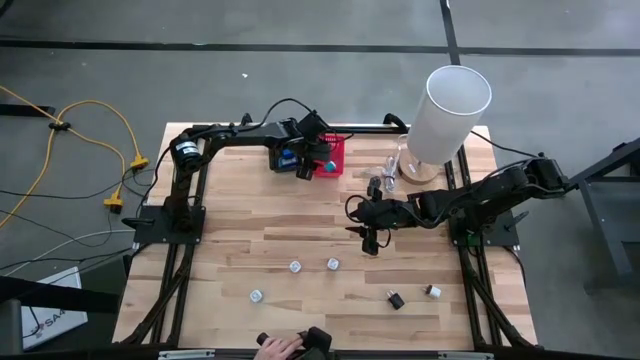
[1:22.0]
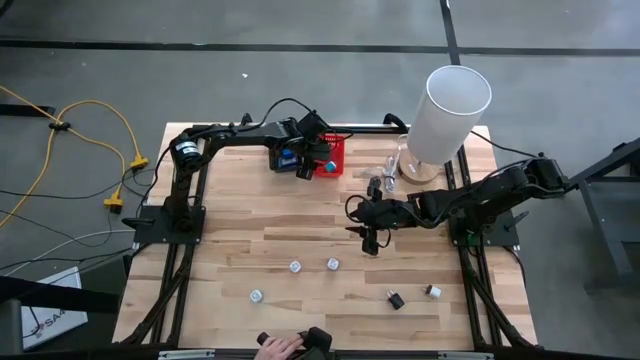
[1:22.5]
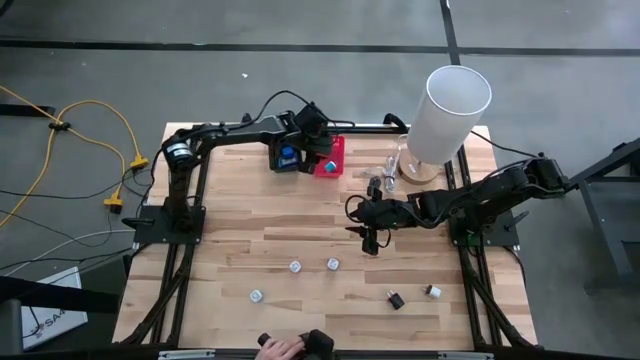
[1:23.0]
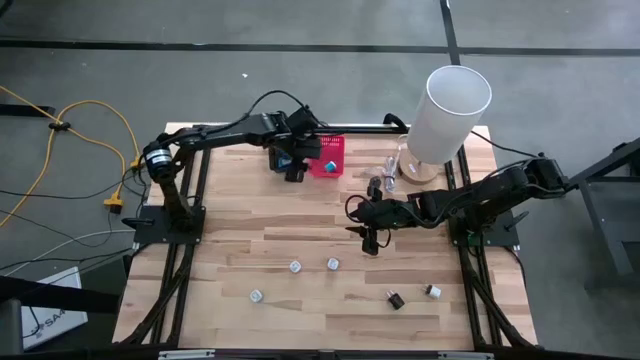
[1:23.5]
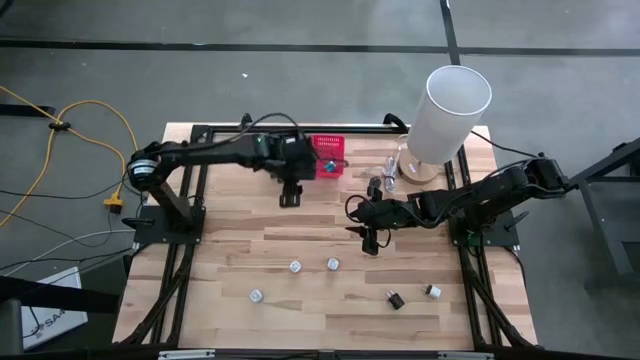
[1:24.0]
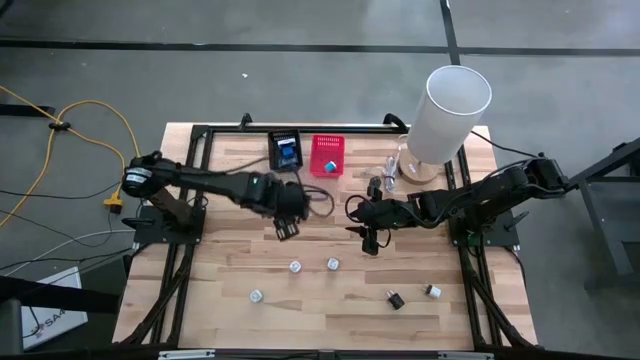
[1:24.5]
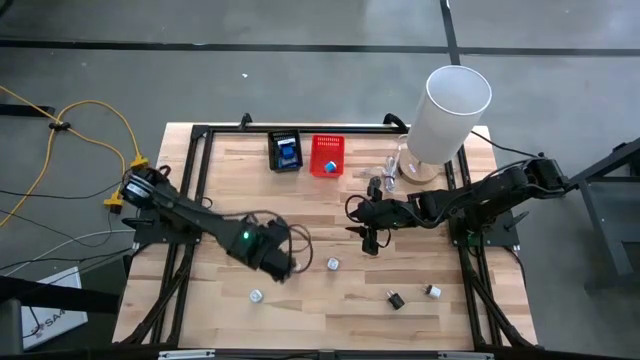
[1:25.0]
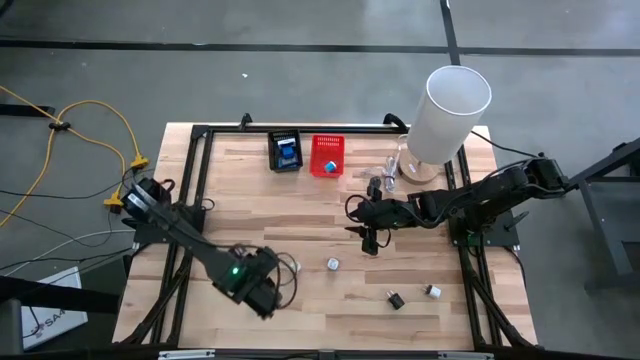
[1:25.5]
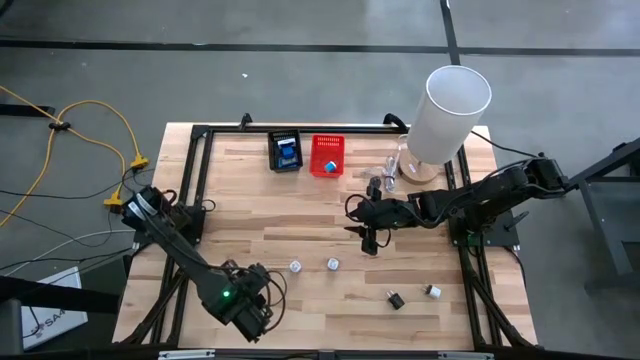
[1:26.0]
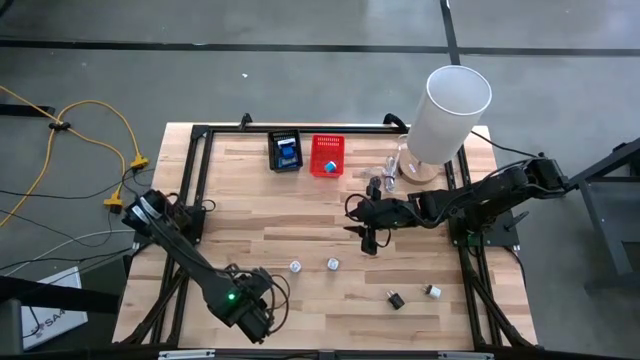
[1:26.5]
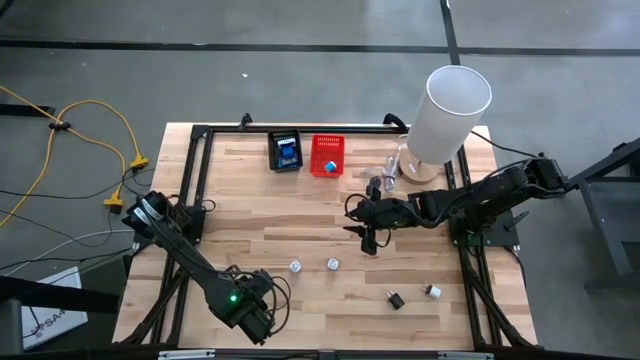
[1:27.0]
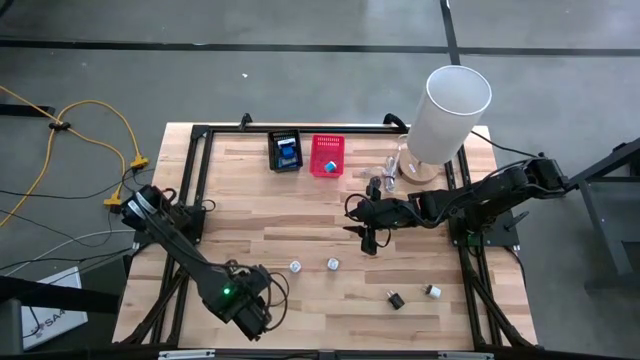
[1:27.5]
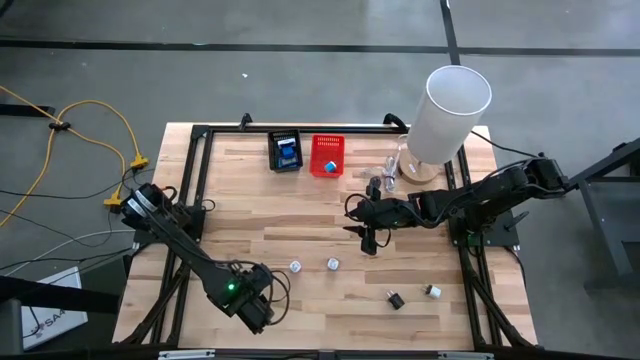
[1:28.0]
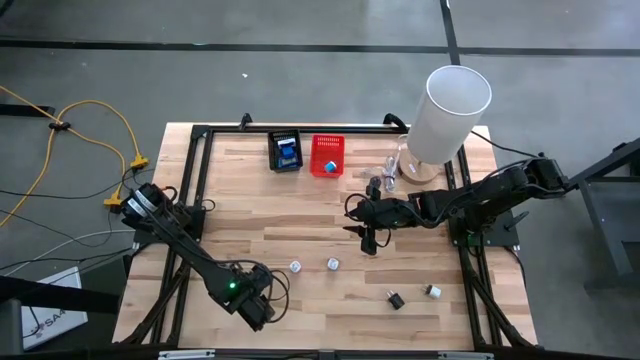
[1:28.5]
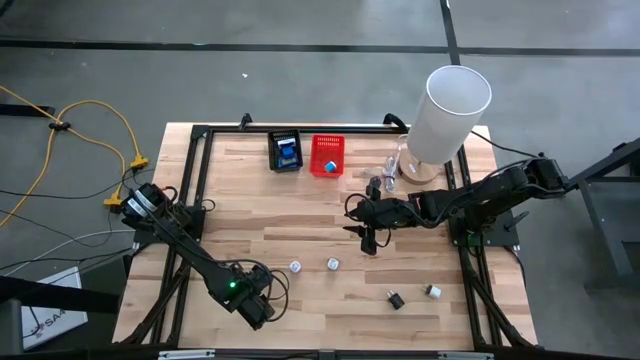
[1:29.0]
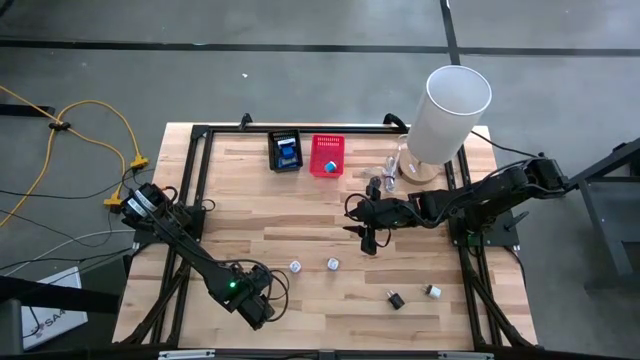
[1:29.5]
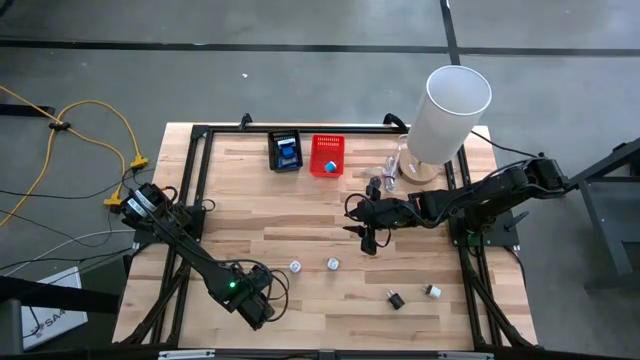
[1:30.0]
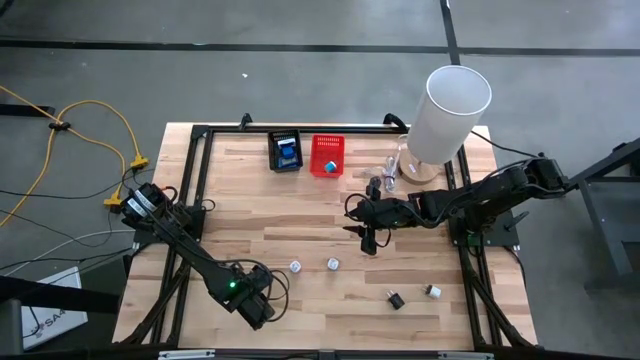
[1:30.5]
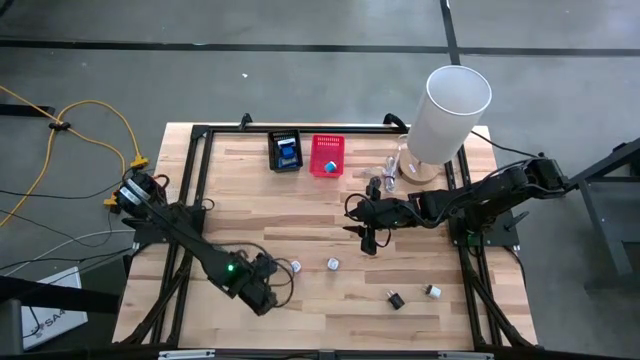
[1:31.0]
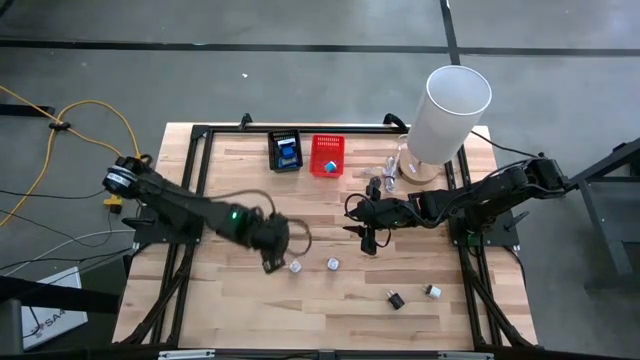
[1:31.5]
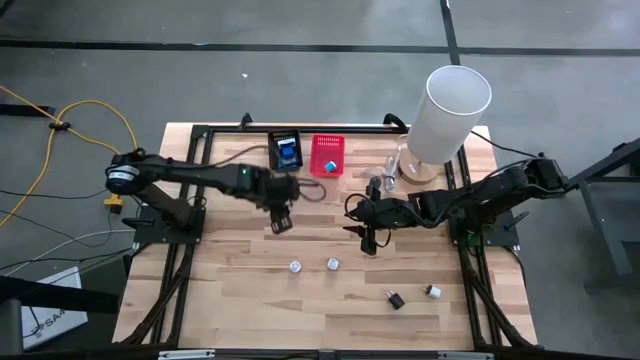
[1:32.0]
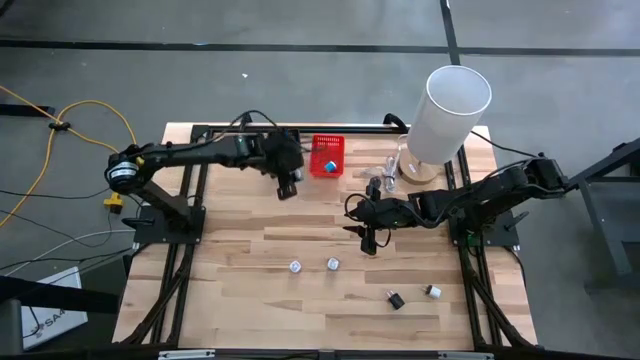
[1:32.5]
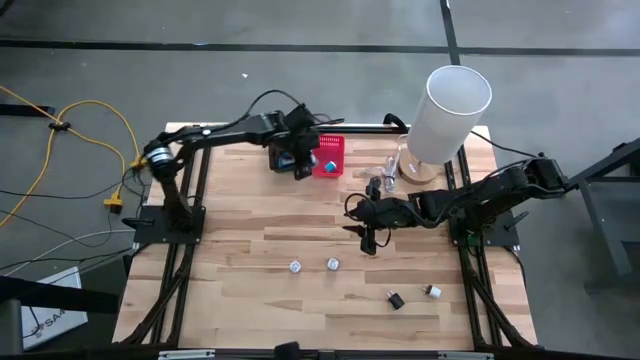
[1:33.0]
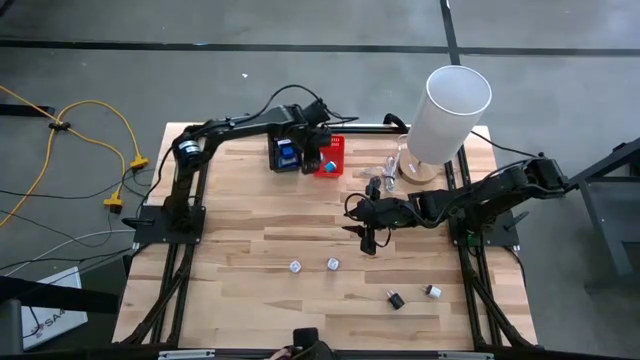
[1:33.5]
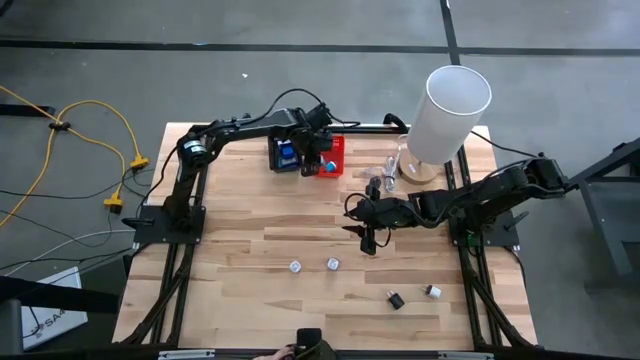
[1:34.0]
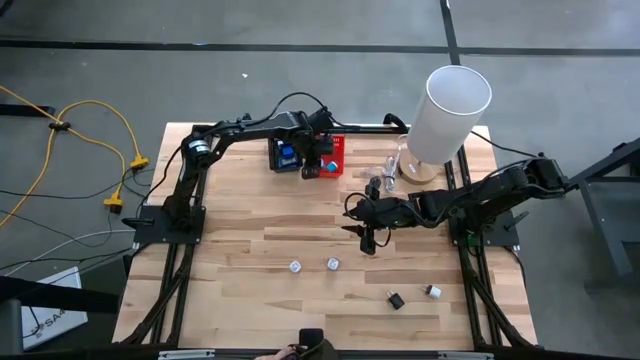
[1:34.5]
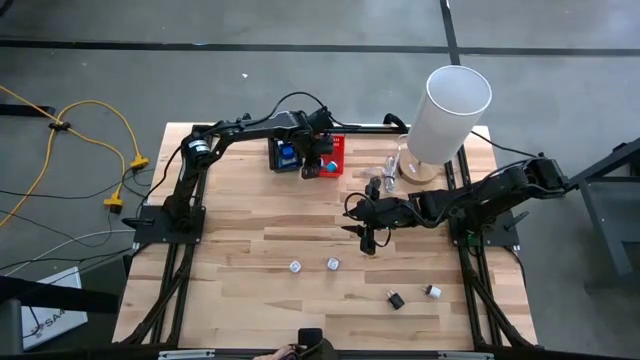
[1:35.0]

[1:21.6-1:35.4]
Task: Pick & Place Office items
Put the blue charger adapter into the red basket
